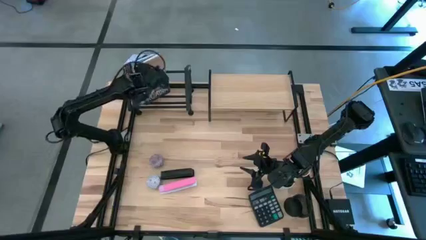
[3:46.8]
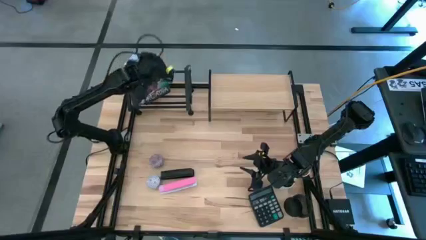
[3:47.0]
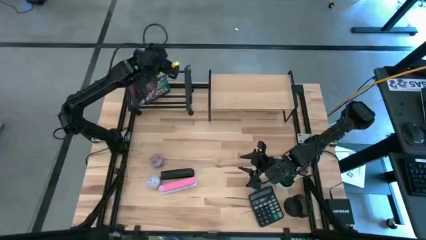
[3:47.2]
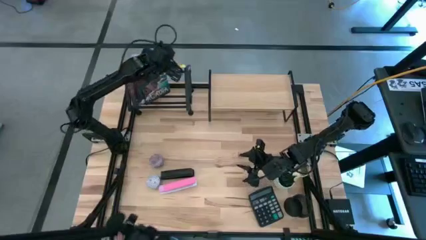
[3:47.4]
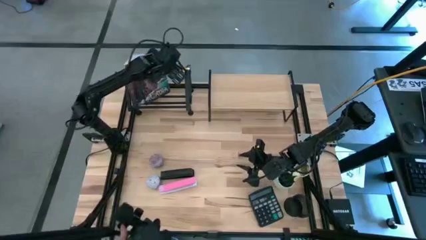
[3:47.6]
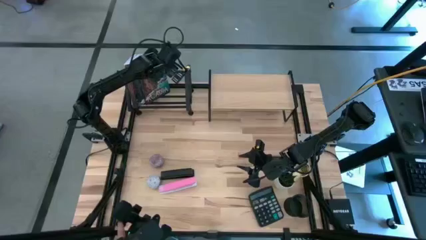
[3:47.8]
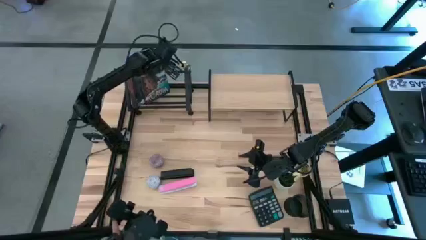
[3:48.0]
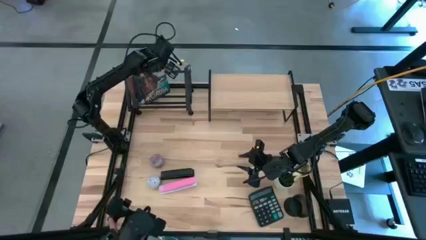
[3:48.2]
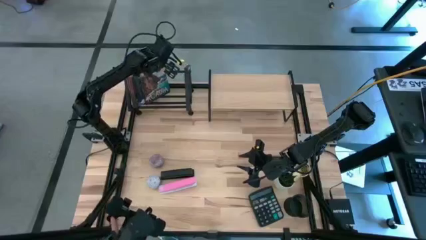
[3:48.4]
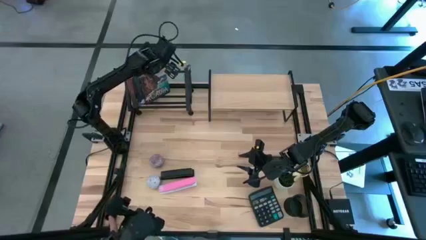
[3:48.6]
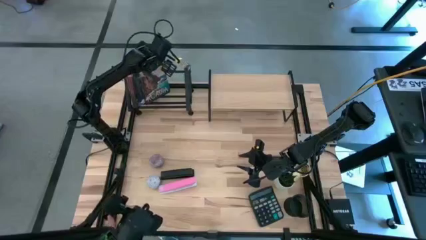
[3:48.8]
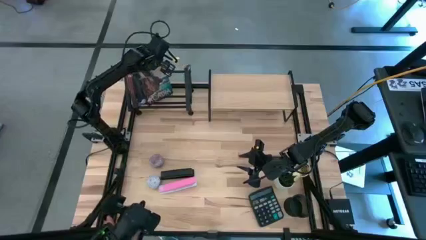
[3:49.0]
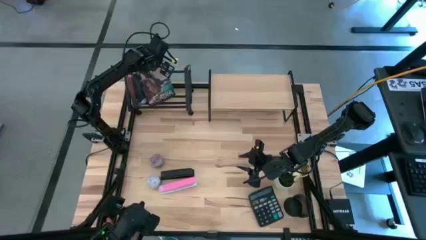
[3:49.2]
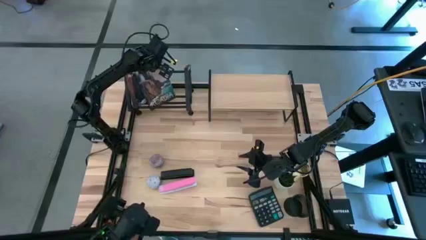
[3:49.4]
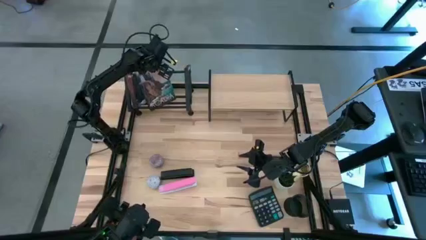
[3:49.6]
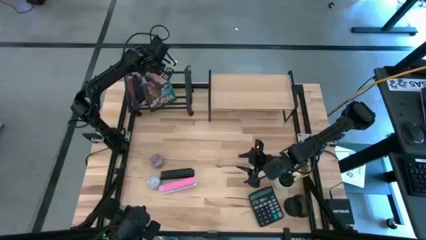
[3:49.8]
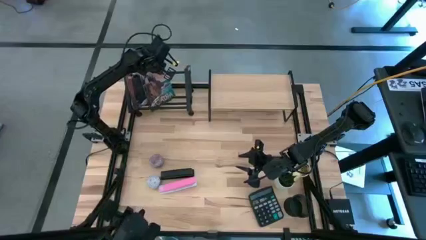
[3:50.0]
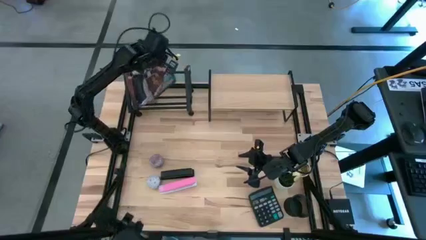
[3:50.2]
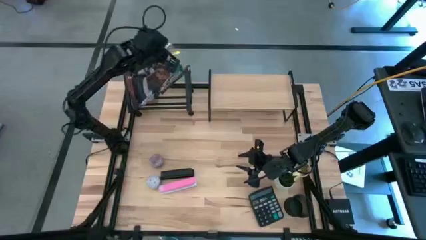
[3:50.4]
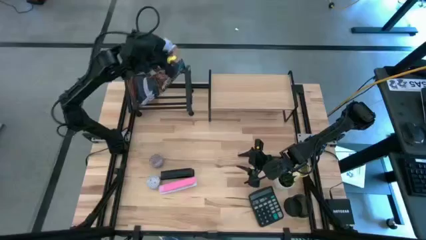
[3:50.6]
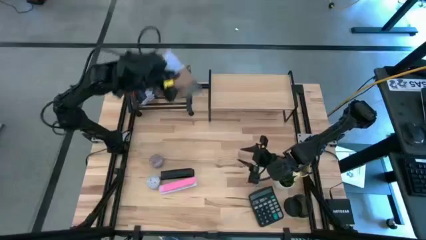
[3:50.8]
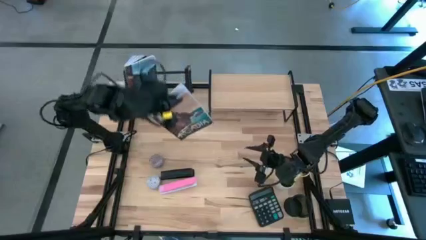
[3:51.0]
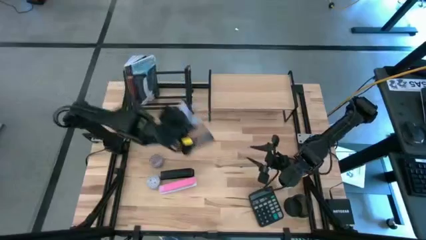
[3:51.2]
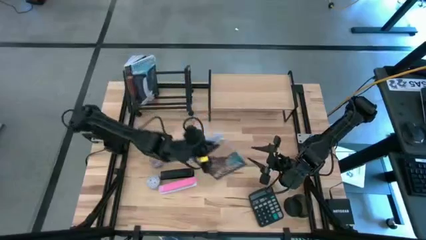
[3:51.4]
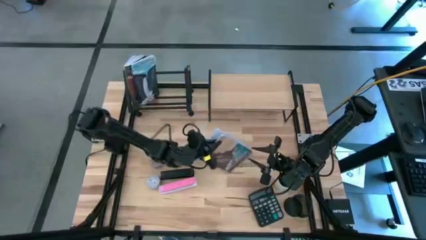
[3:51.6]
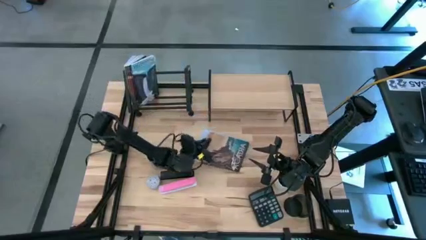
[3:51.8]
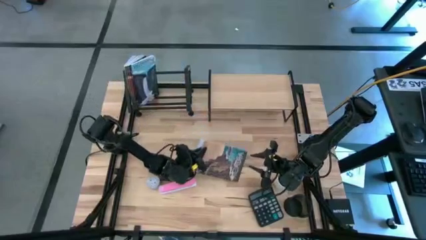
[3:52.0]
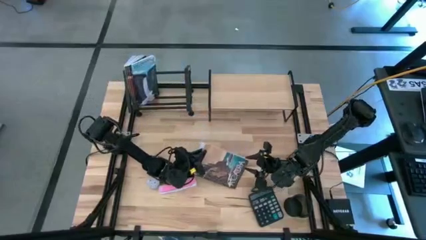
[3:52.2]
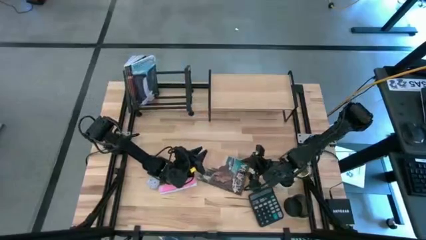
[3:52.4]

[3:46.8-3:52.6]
Task: Stock shelves
Remove the brown book from the book holder

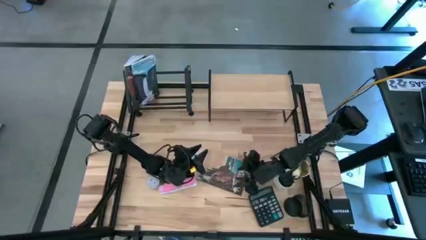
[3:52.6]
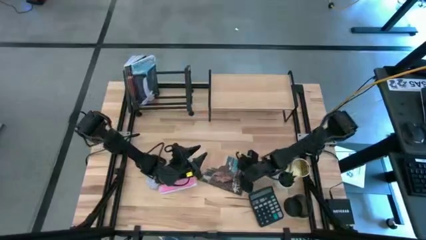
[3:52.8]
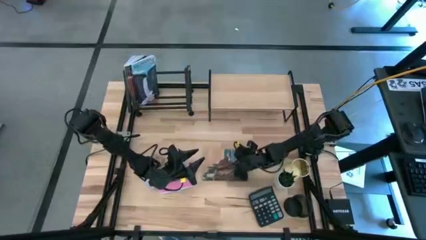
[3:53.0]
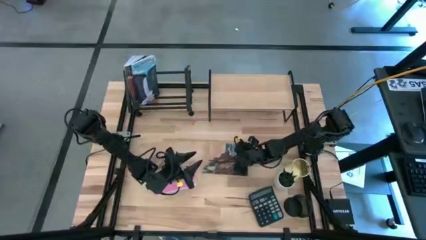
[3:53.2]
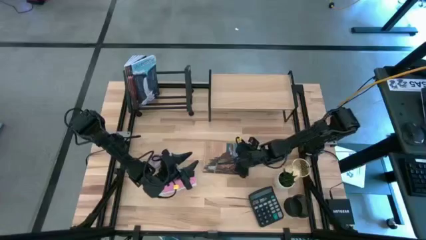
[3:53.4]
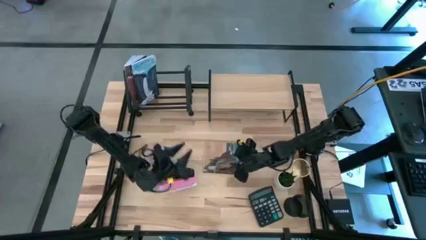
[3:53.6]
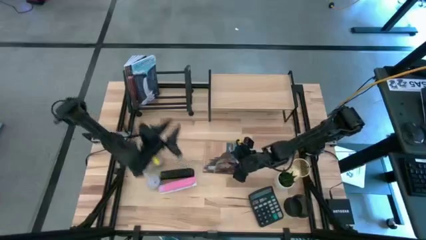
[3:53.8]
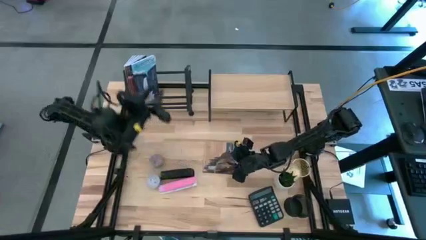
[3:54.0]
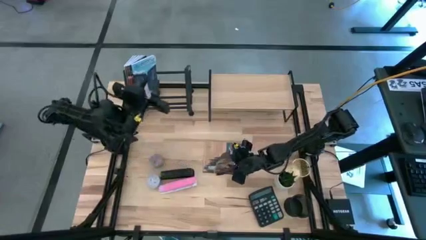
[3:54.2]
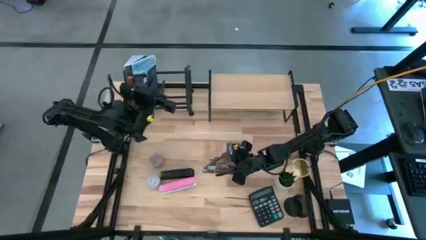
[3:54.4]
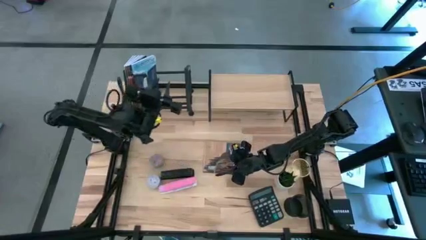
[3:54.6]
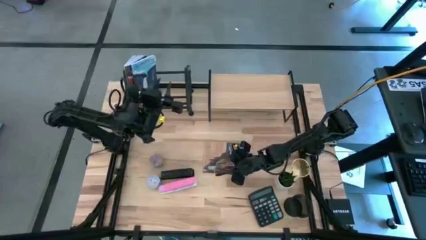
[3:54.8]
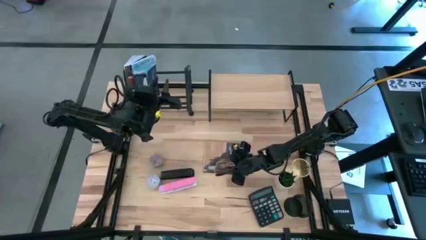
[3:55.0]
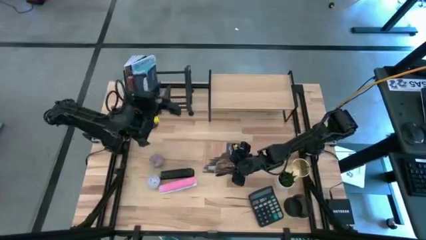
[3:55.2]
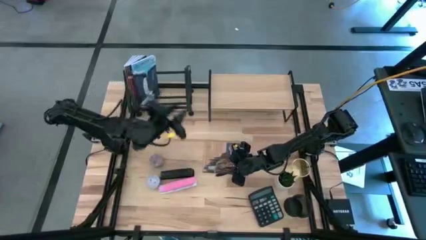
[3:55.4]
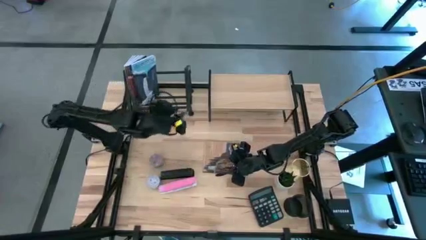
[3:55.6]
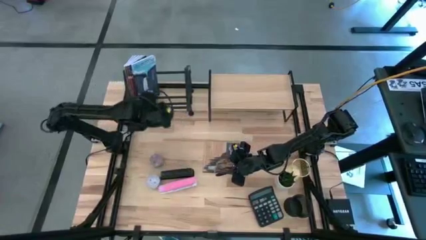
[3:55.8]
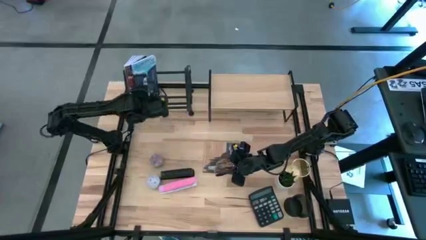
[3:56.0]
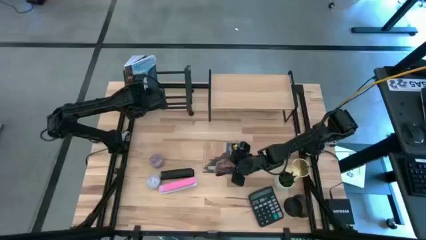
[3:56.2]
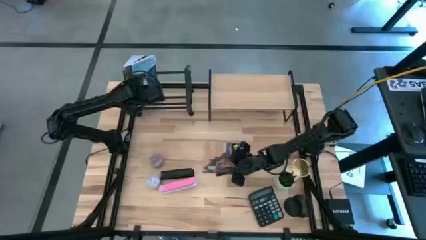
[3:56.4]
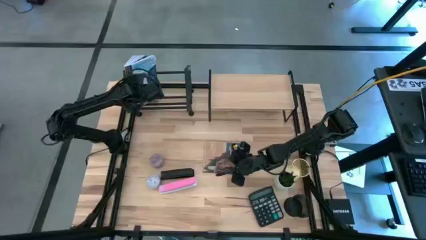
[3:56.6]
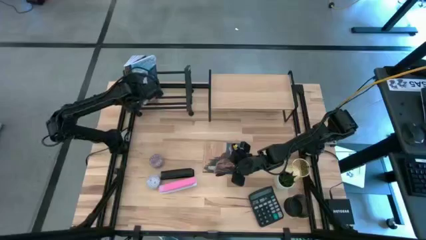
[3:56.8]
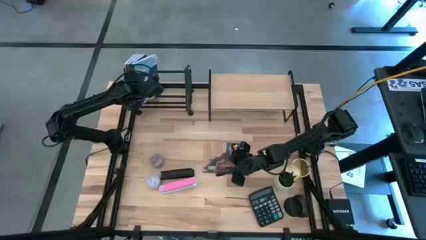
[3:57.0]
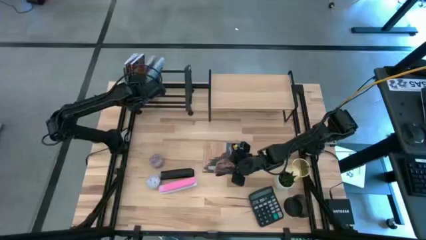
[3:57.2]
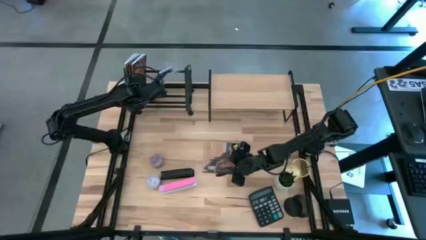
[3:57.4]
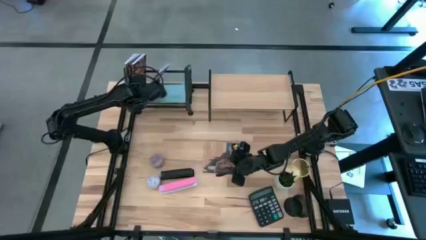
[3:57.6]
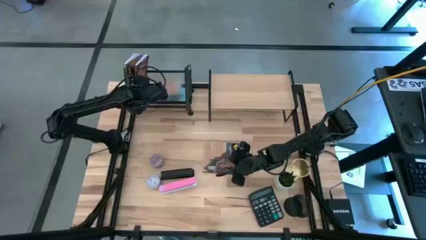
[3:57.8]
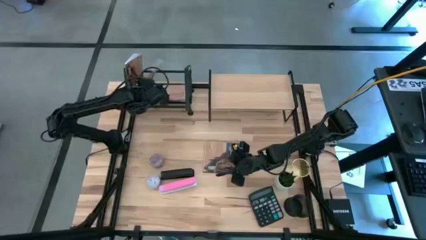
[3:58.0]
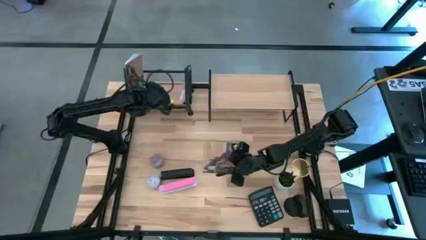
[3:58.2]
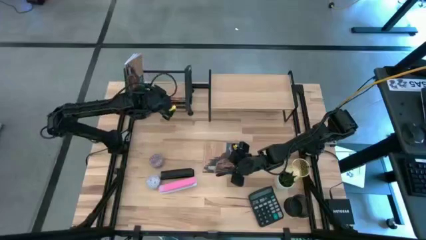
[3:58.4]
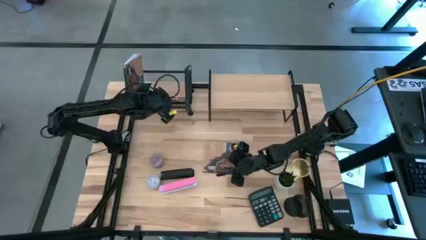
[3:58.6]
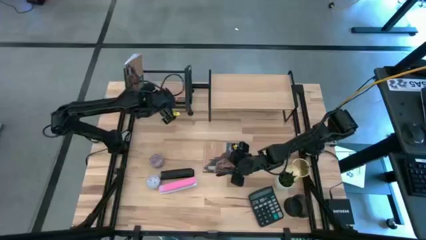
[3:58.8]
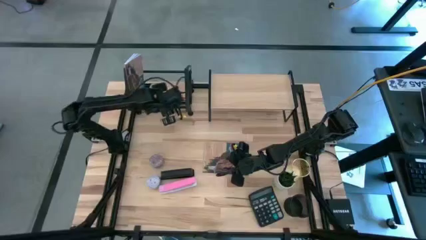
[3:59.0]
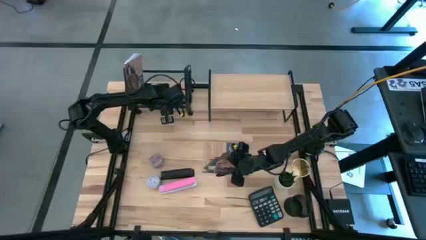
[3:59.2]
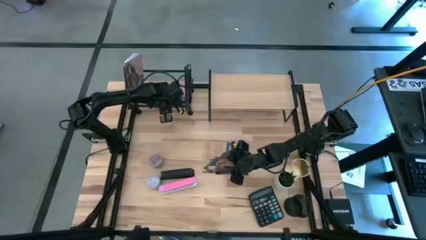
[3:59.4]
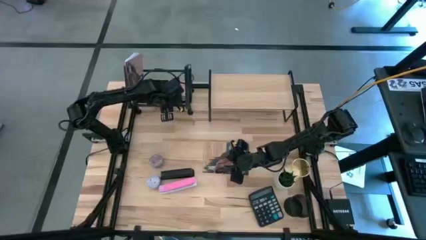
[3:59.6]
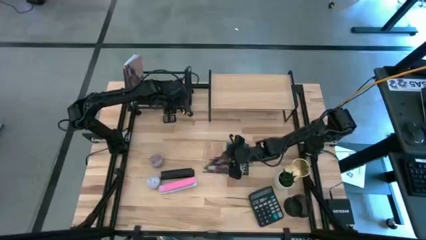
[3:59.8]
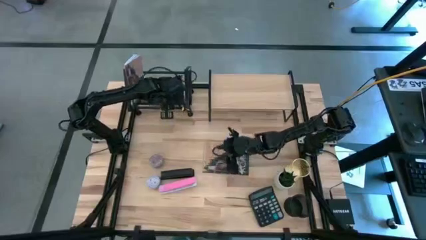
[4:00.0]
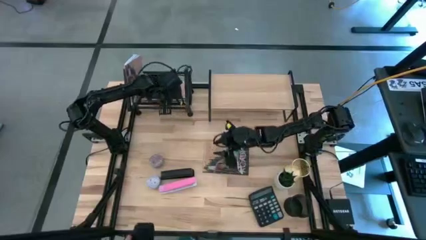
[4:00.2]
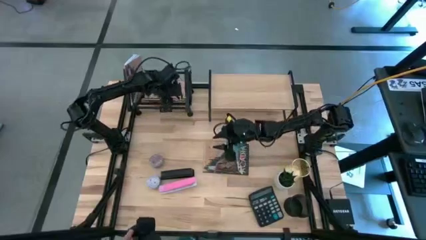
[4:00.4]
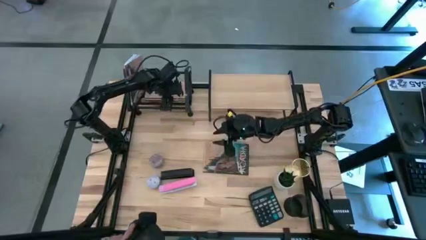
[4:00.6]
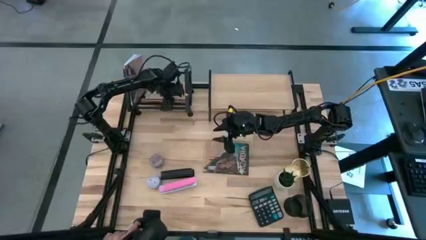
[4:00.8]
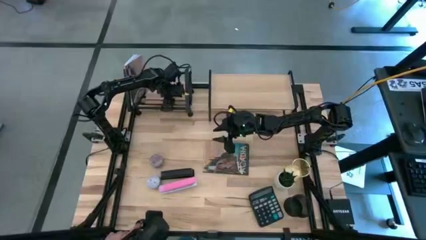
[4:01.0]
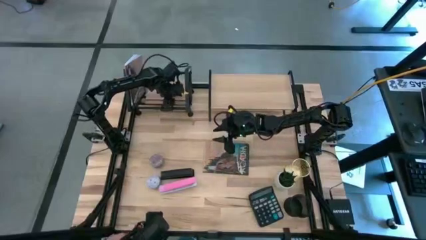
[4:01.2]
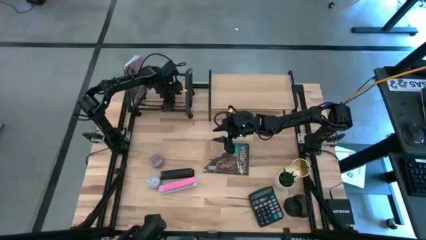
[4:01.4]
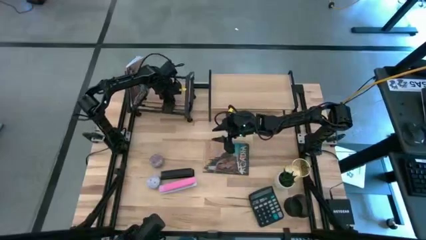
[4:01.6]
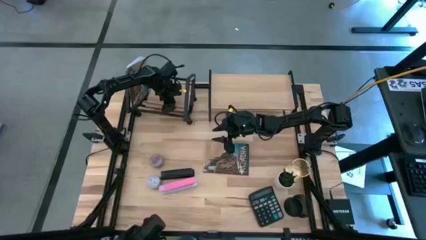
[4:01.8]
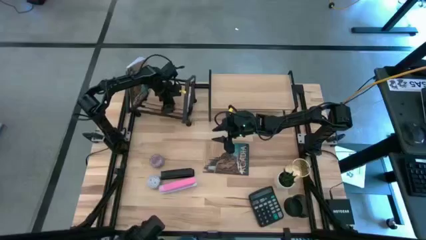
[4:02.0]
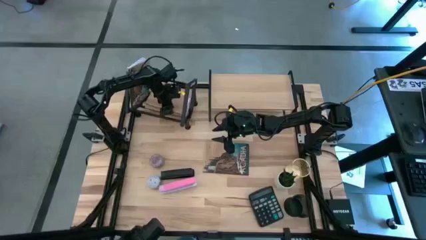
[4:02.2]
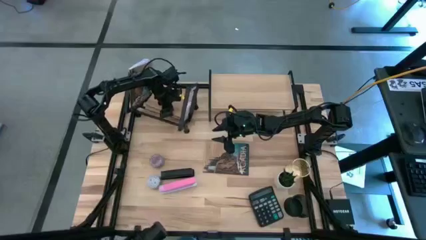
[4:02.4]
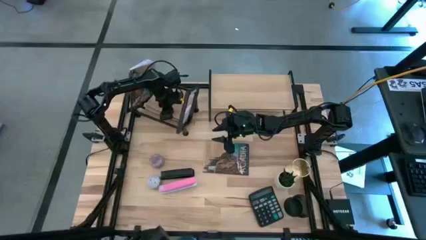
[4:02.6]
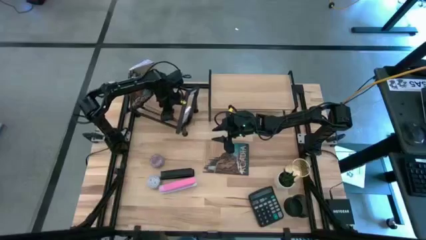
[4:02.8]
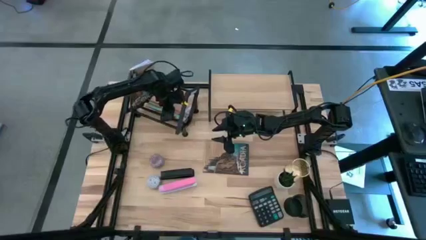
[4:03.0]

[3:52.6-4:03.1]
Remove the brown book from the book holder
